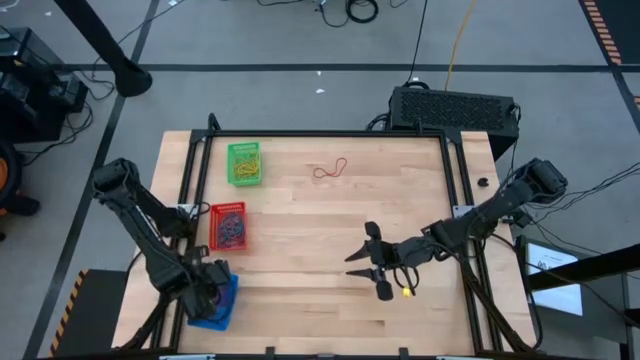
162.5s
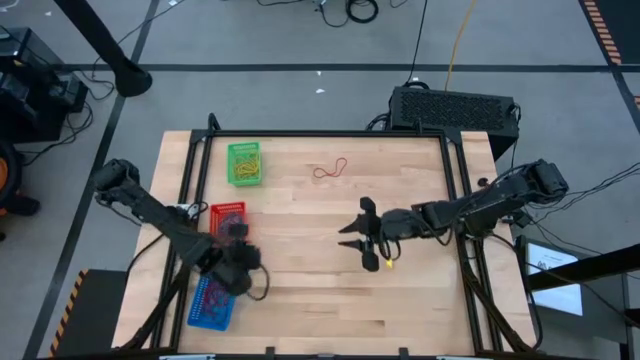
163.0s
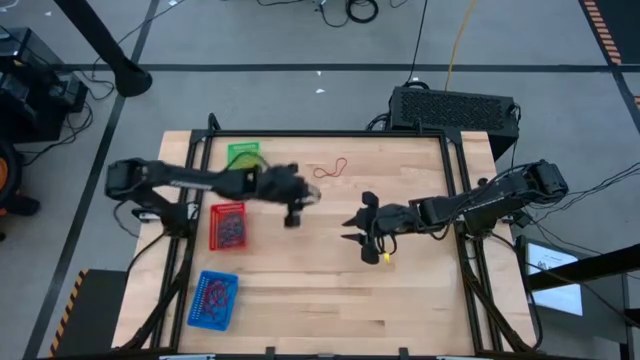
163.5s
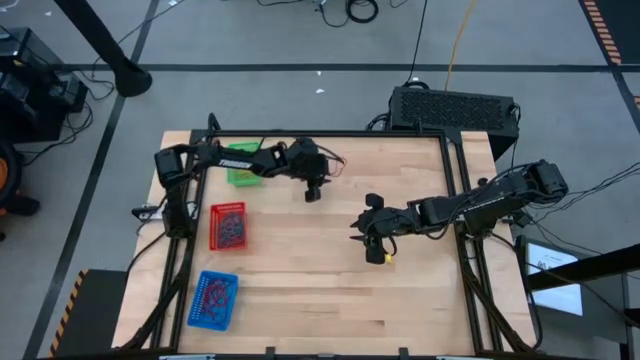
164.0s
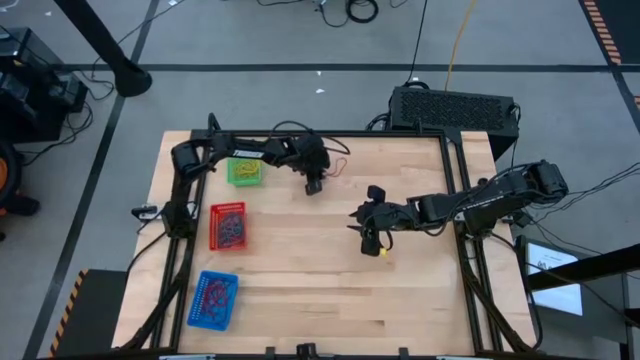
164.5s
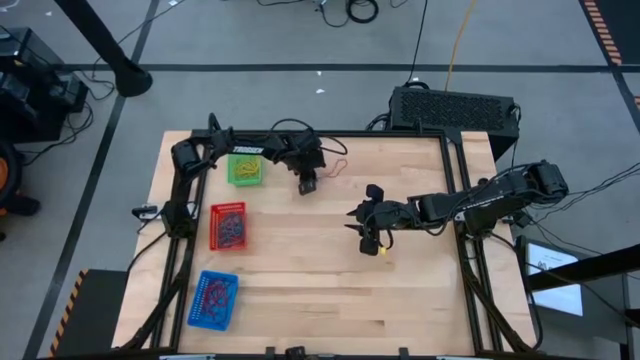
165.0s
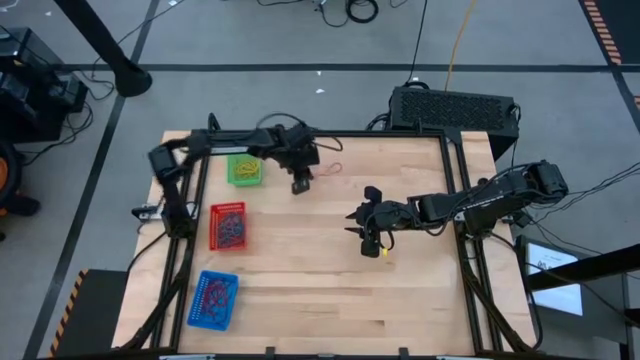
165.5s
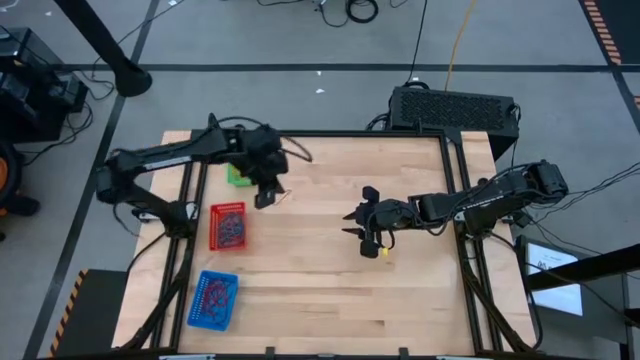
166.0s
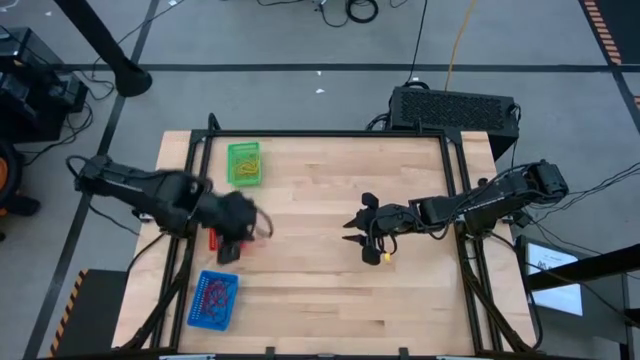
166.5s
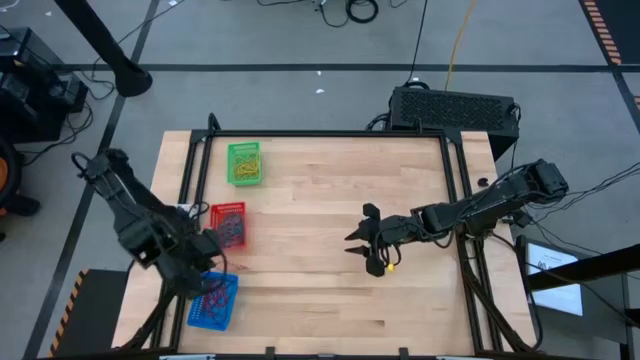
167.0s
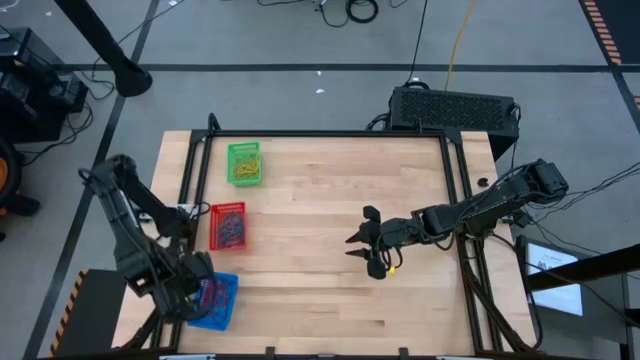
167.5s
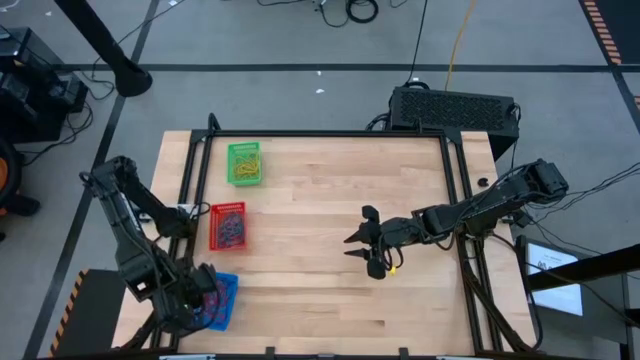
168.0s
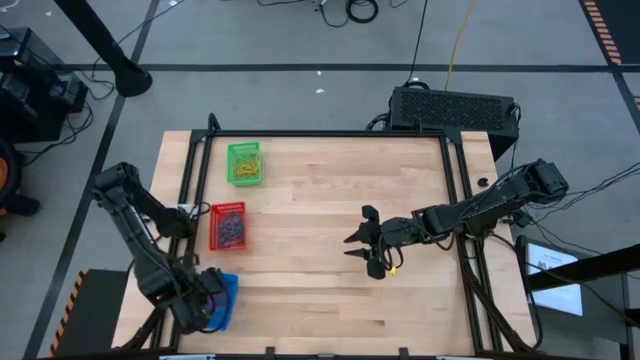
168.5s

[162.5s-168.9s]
Task: Sort rubber bands into baskets
Put the red rubber band into the blue bin

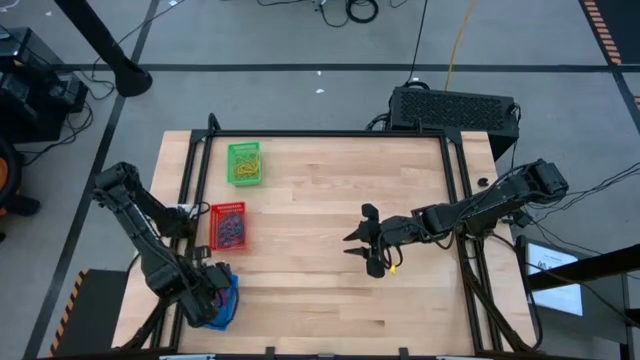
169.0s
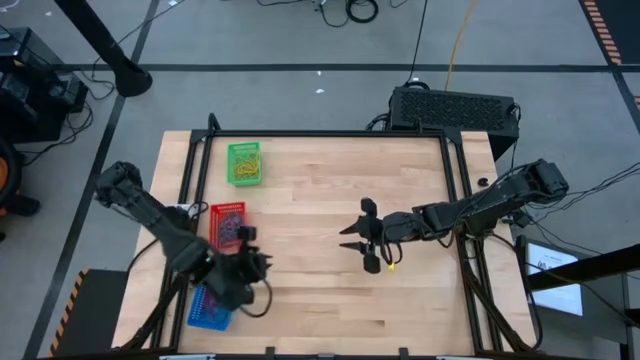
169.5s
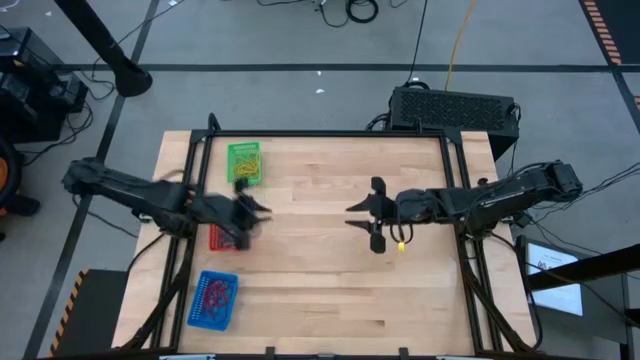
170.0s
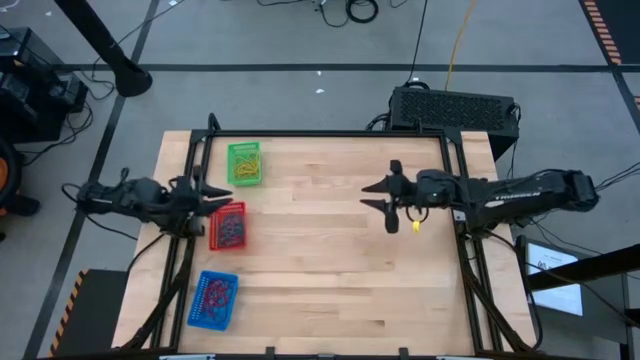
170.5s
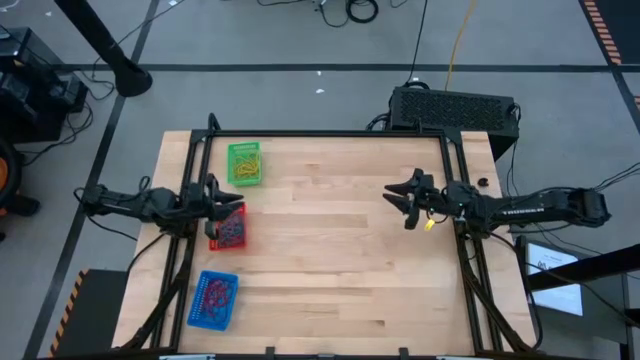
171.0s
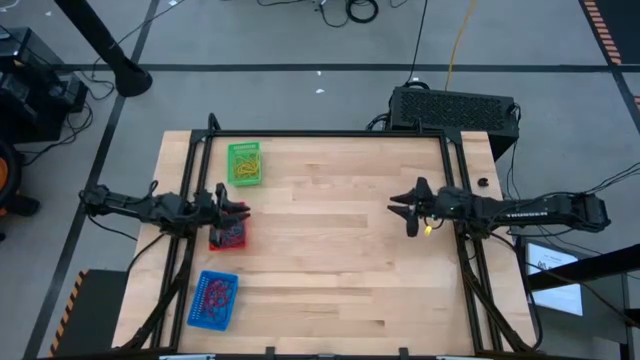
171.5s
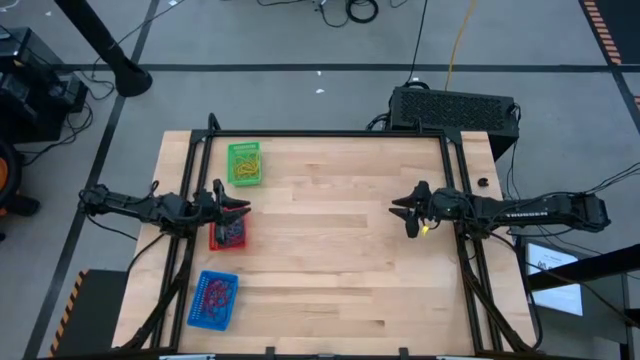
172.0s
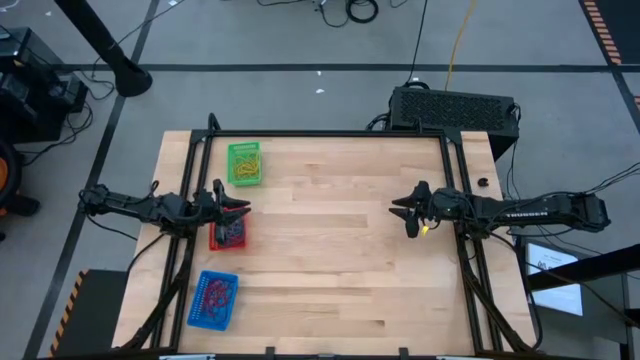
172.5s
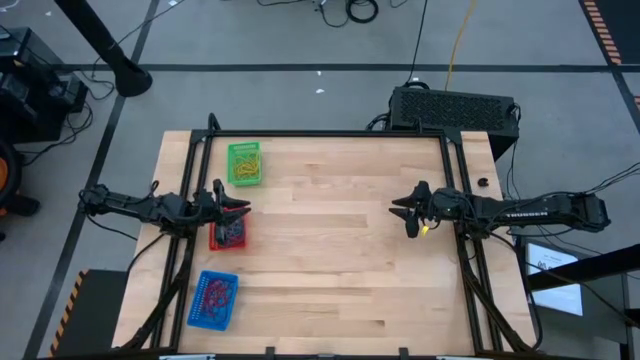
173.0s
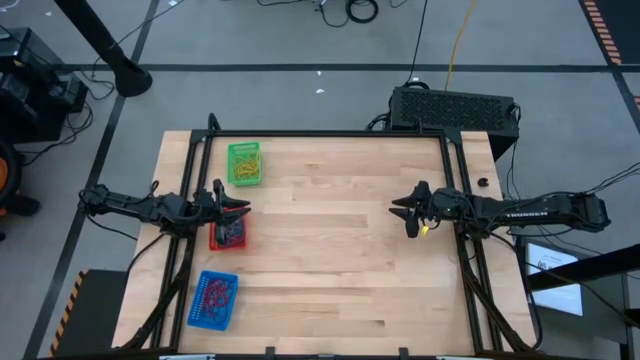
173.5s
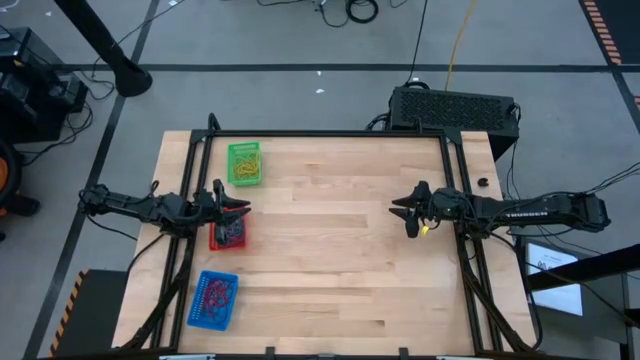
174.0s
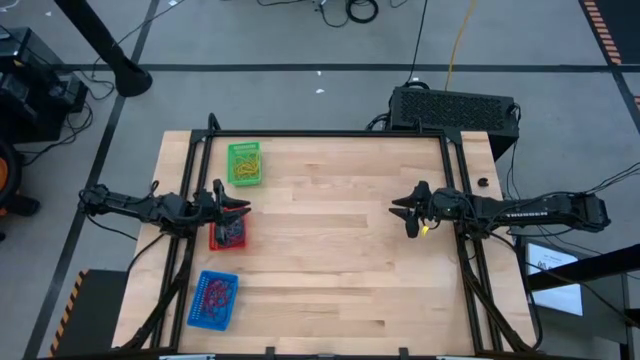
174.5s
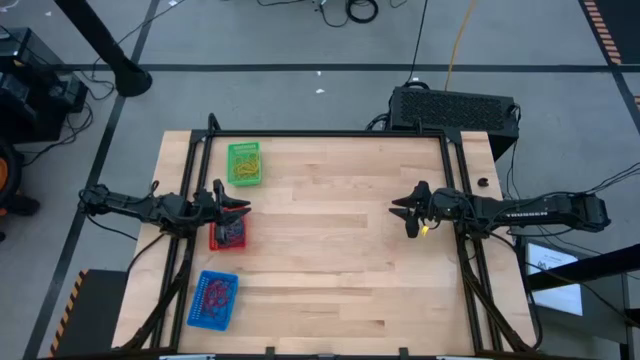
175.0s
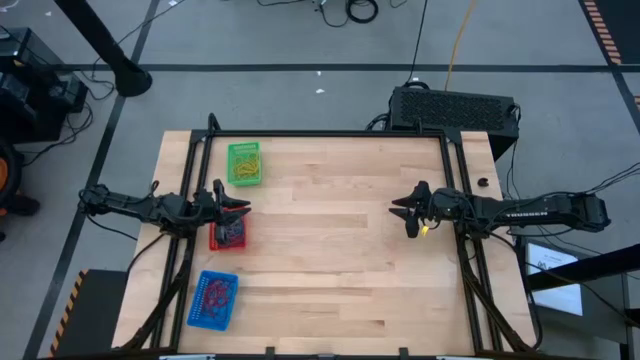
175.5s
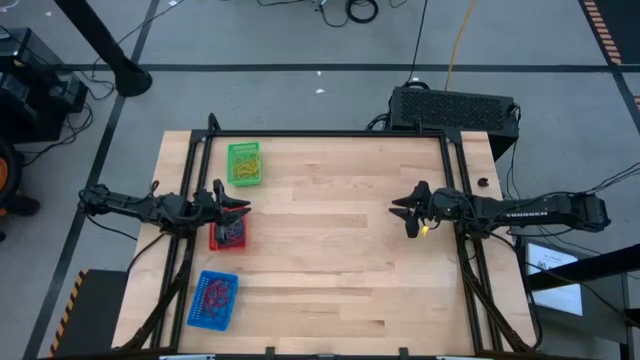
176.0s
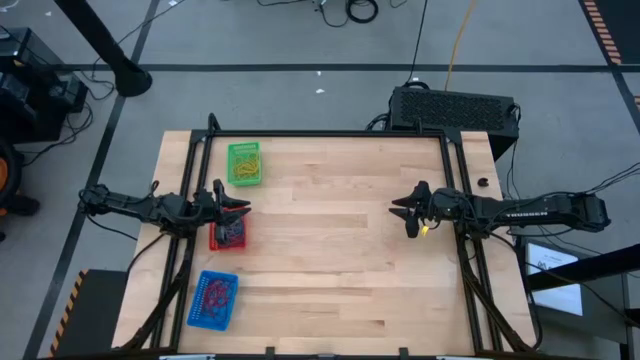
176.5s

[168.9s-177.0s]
Return to Home Position

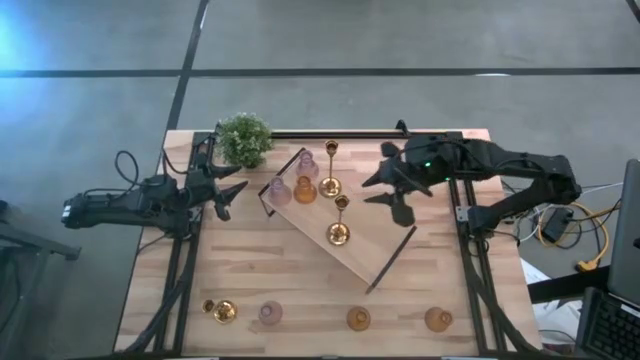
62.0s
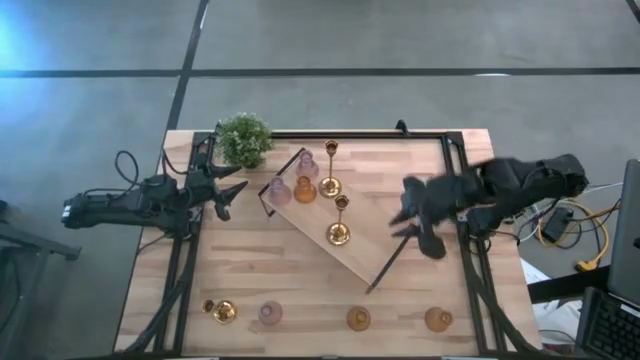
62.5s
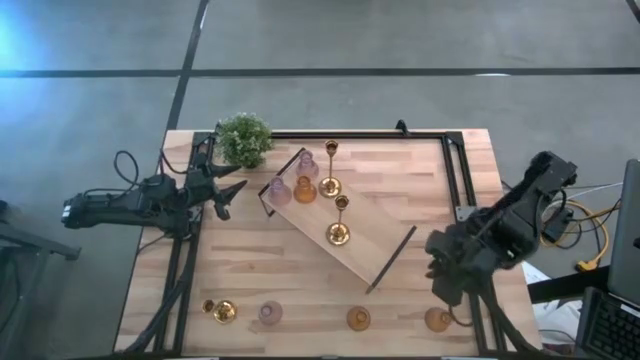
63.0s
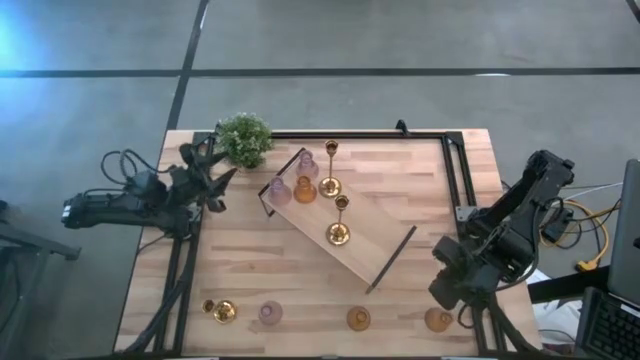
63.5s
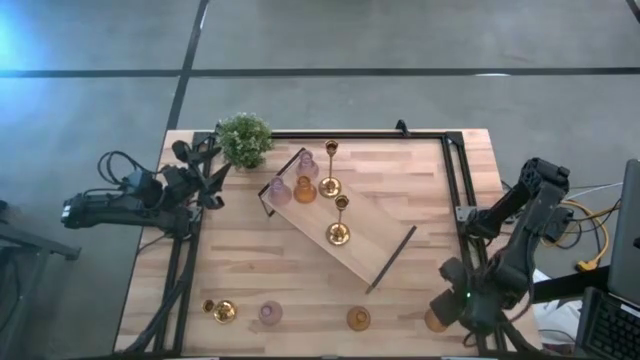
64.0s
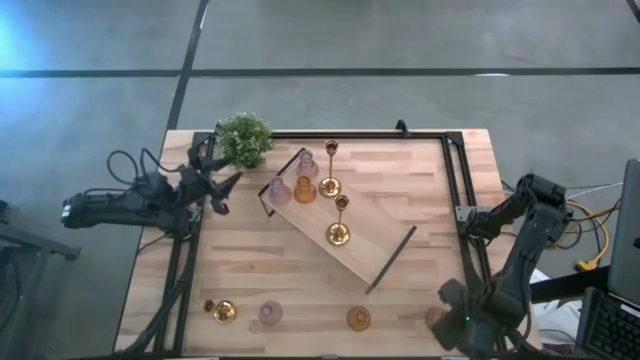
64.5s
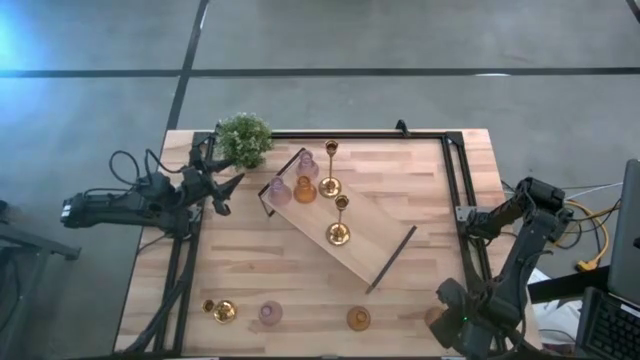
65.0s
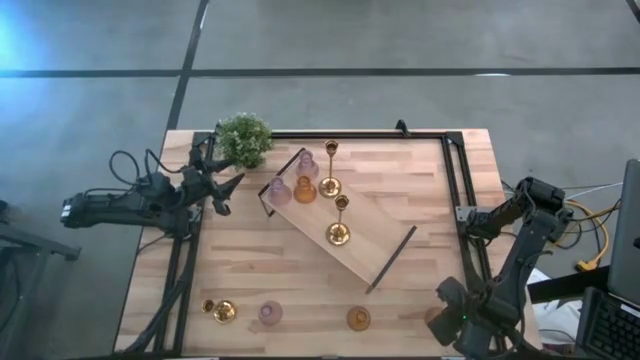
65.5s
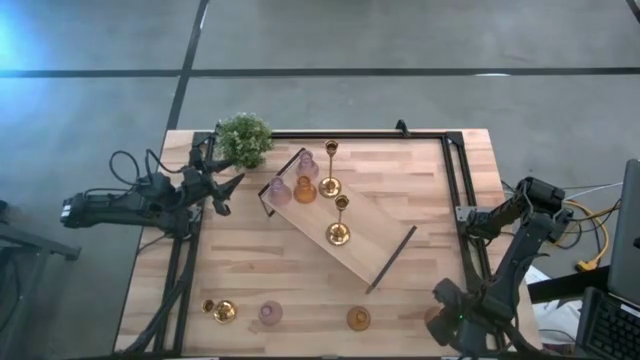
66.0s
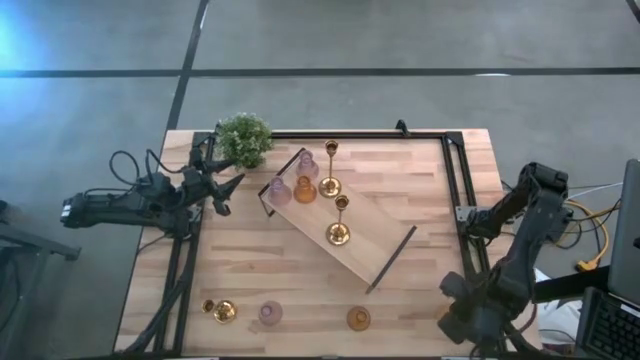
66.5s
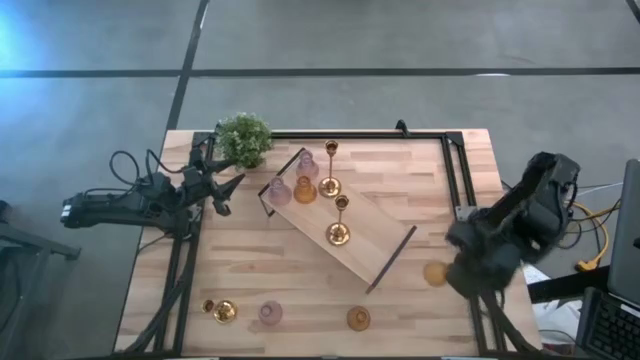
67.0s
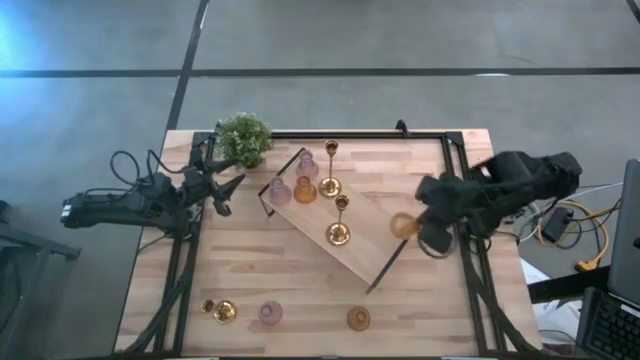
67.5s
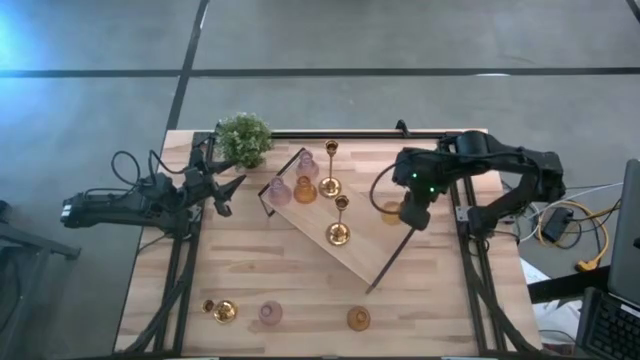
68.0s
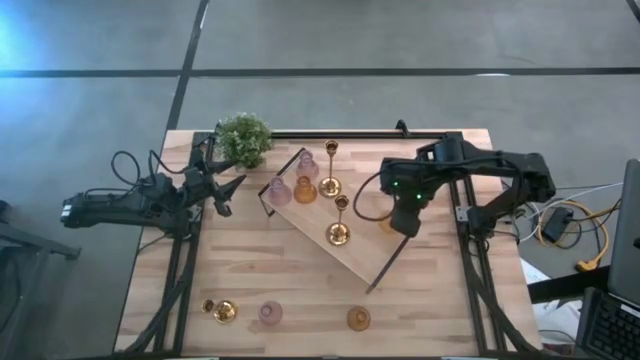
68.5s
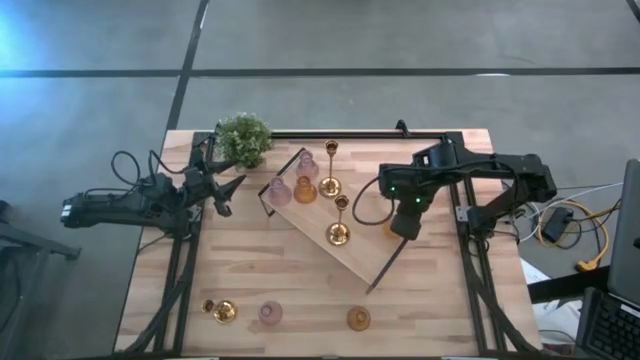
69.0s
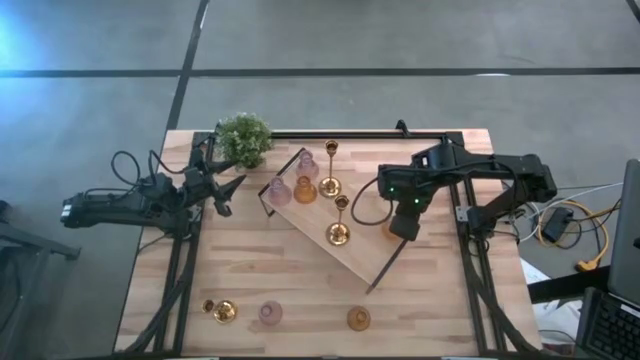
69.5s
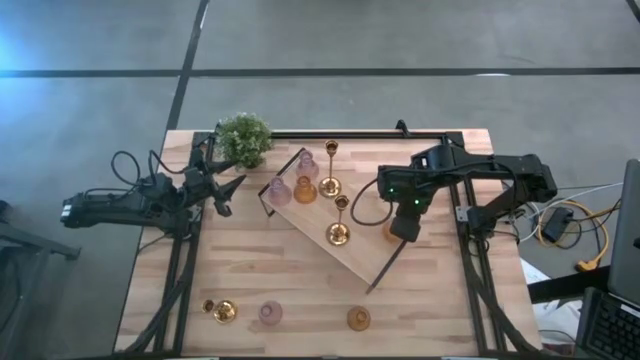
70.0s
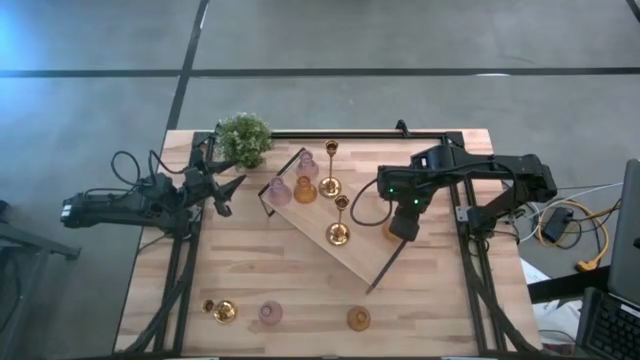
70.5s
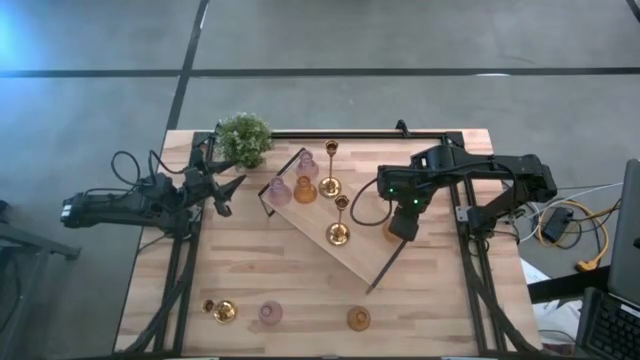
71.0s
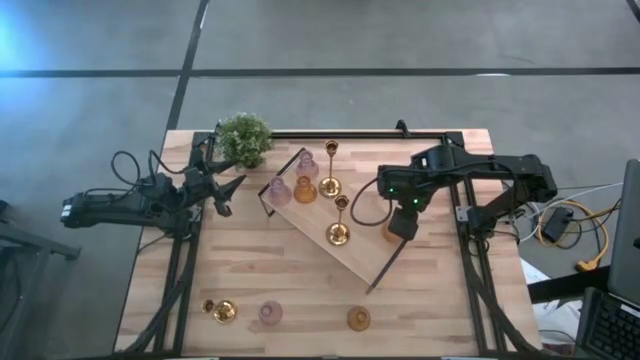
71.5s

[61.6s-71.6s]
Task: Pick & Place candle stick holders
Put the right yellow candle holder on the shelf
